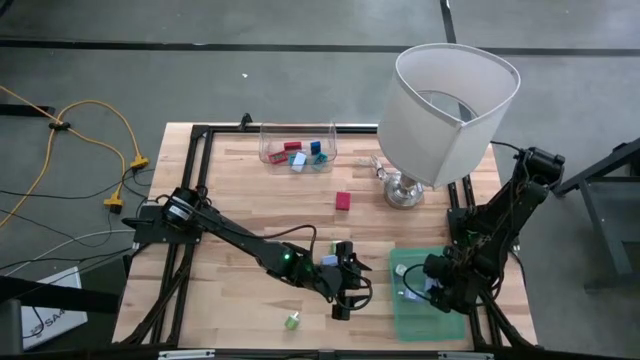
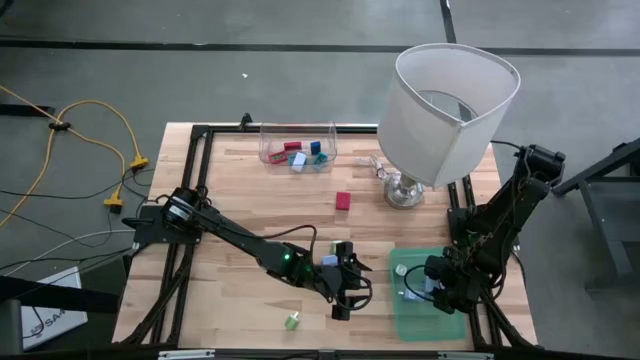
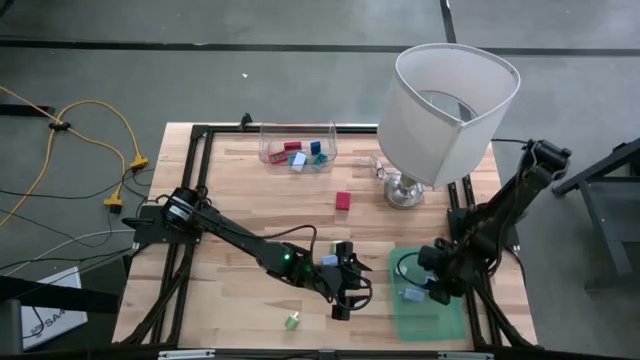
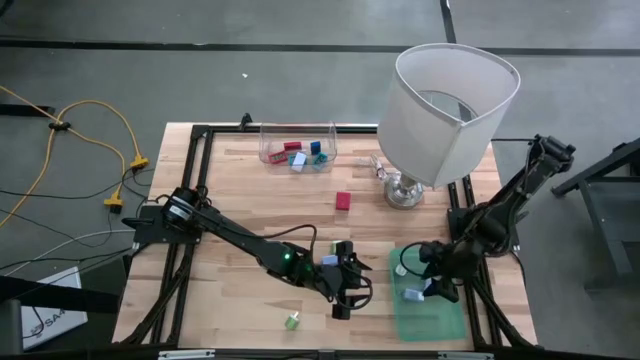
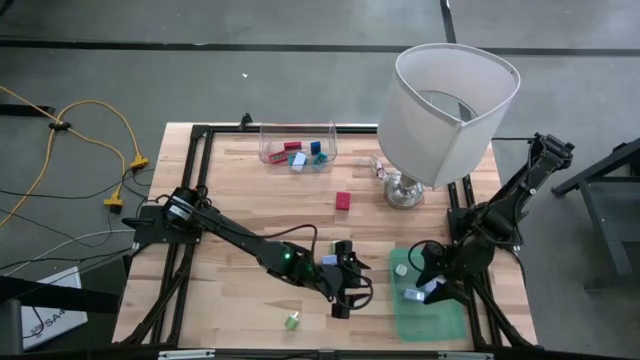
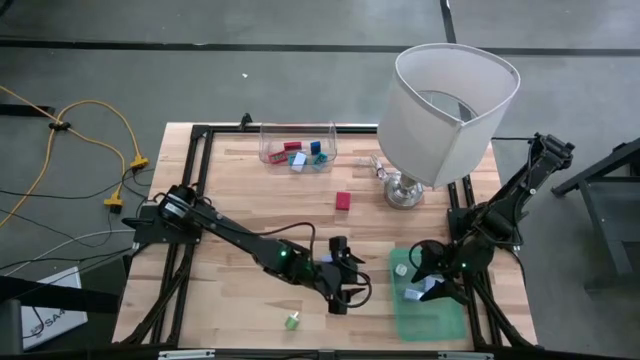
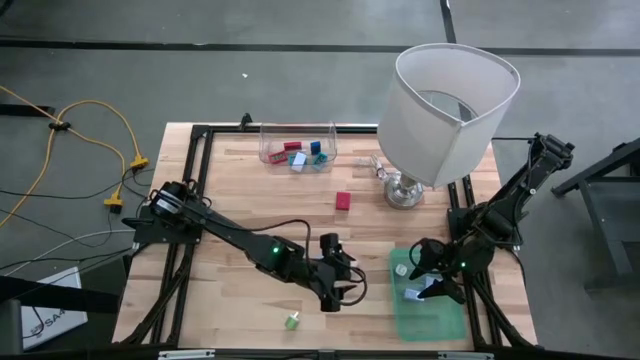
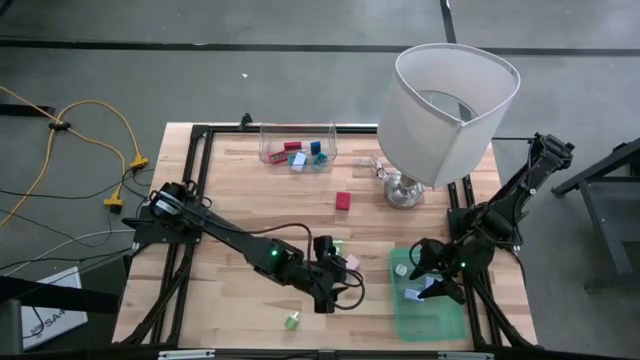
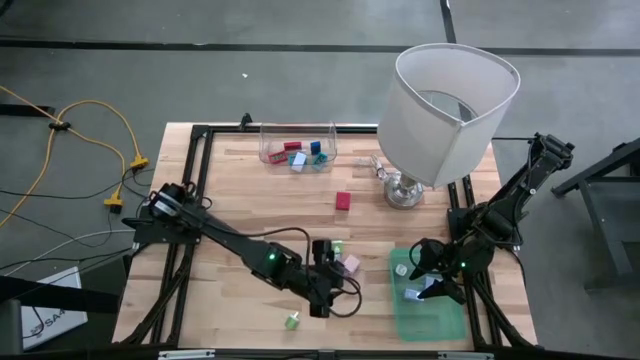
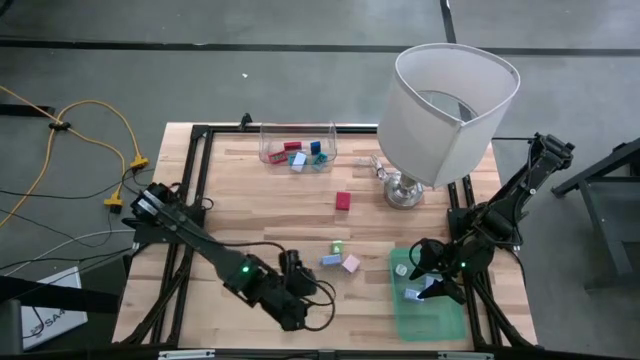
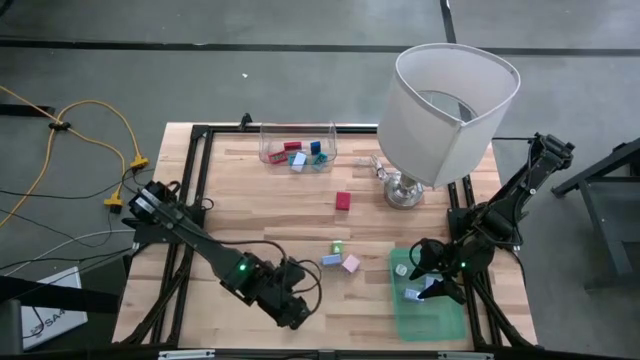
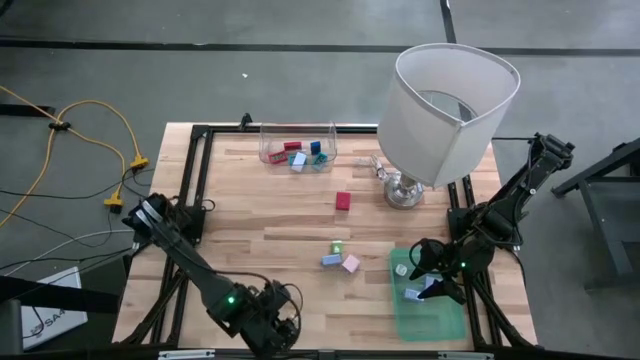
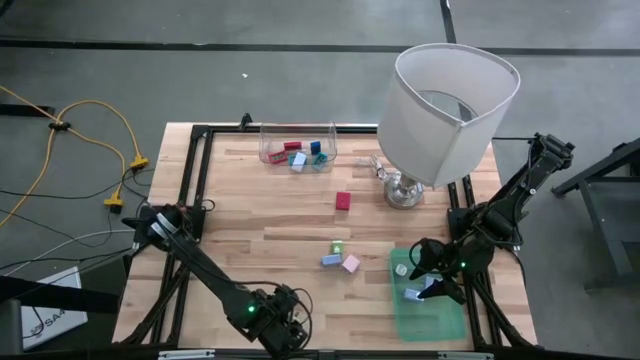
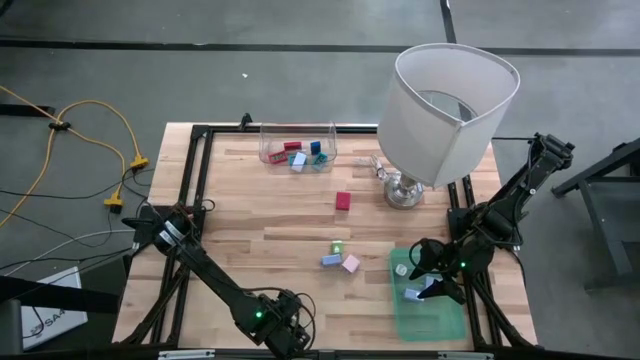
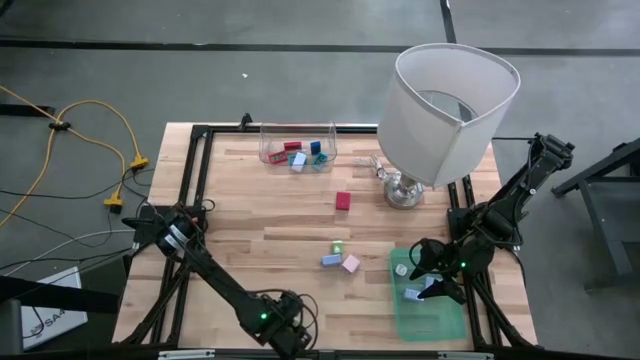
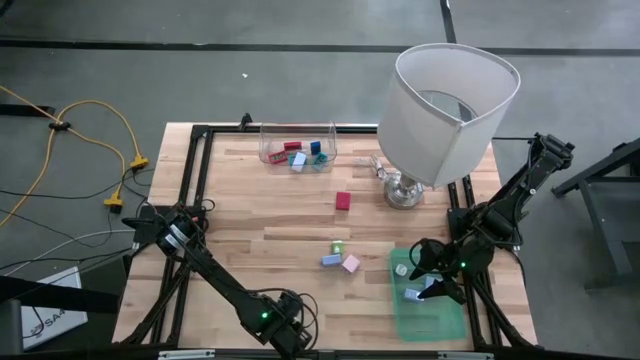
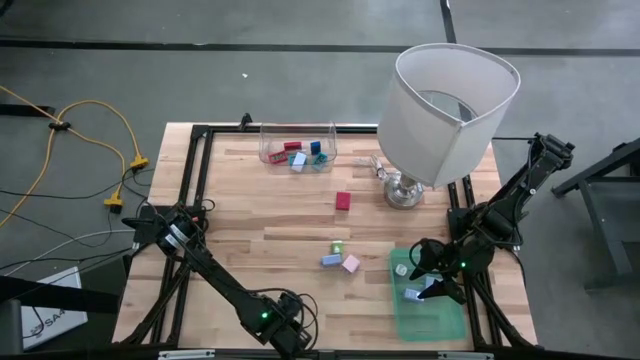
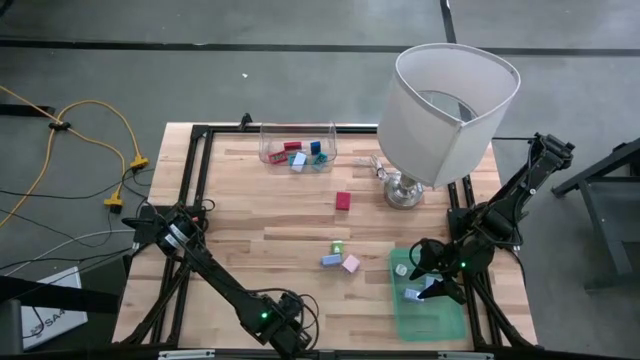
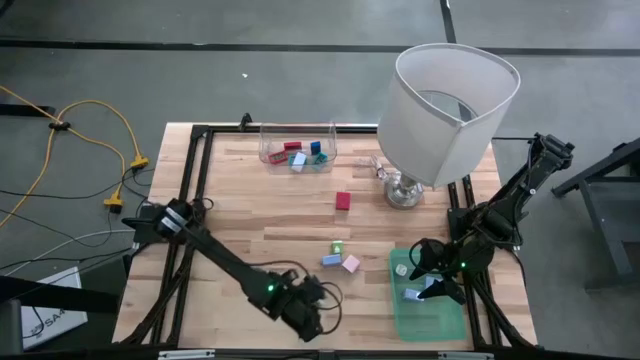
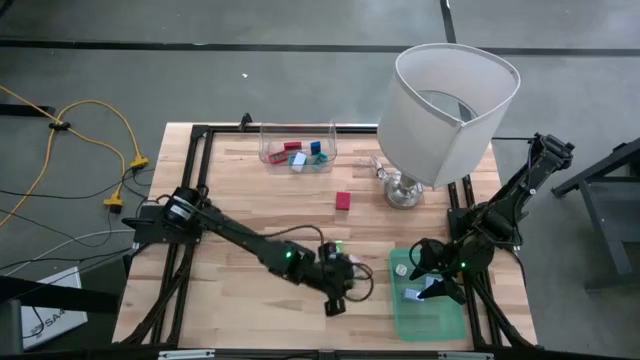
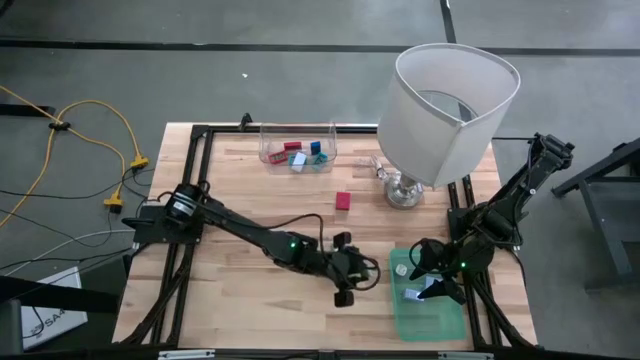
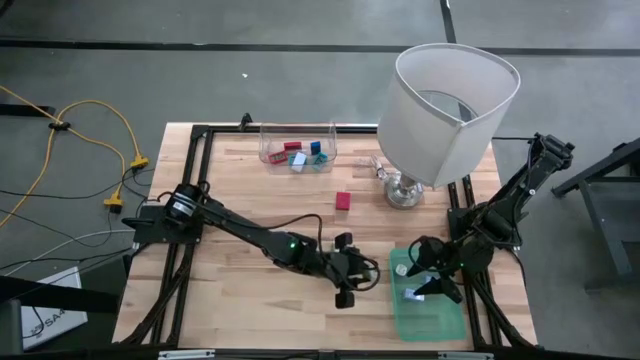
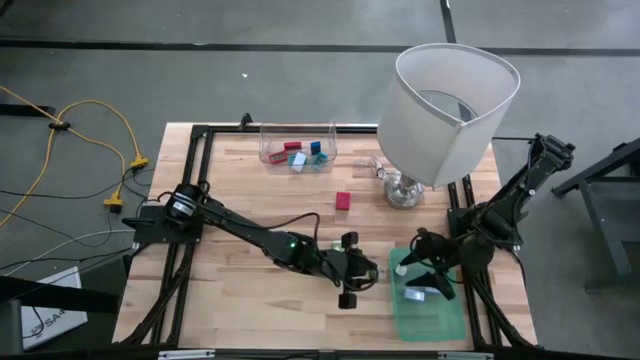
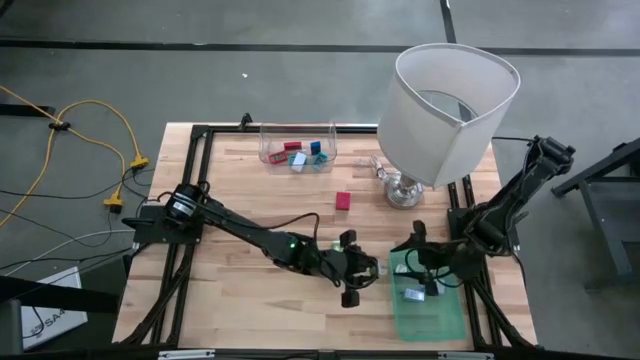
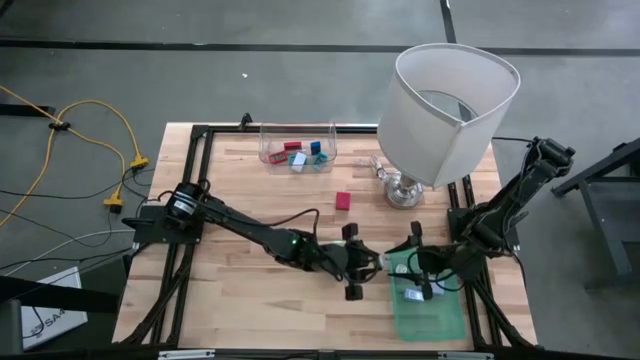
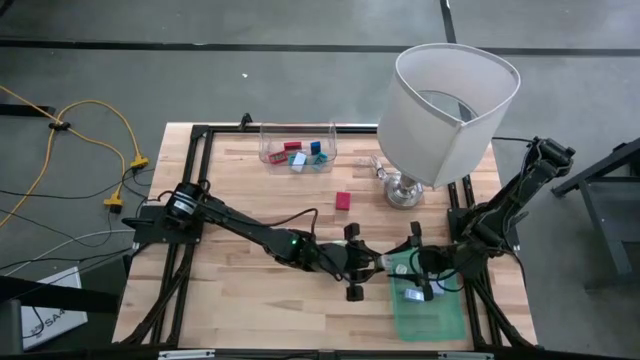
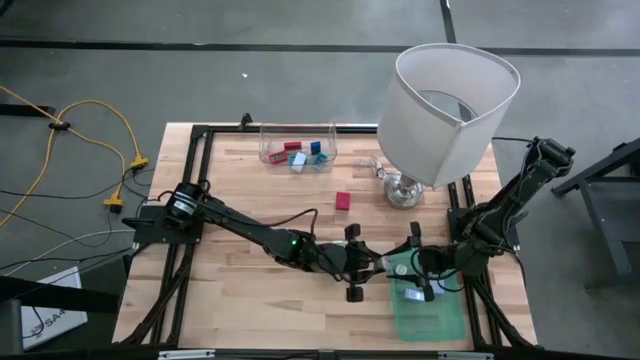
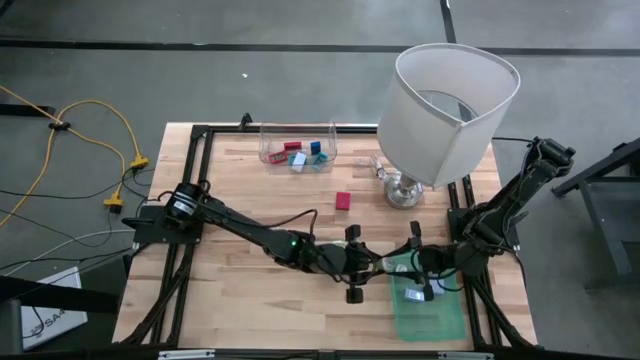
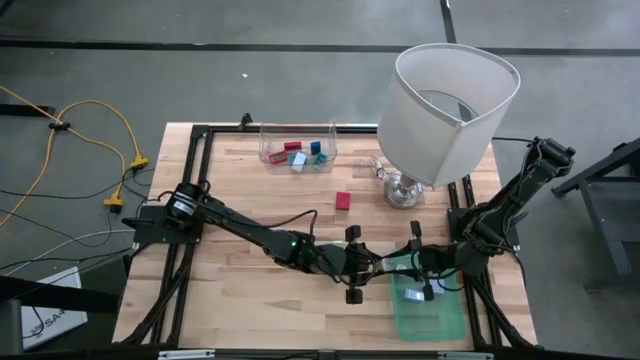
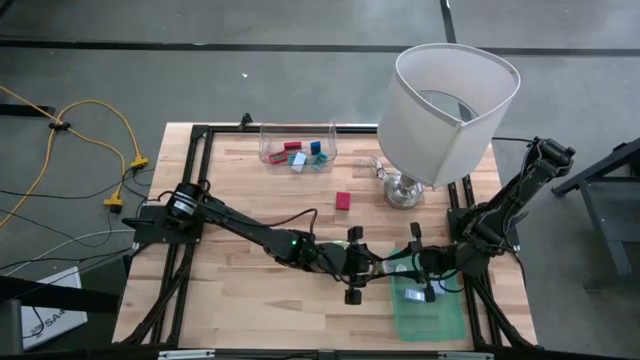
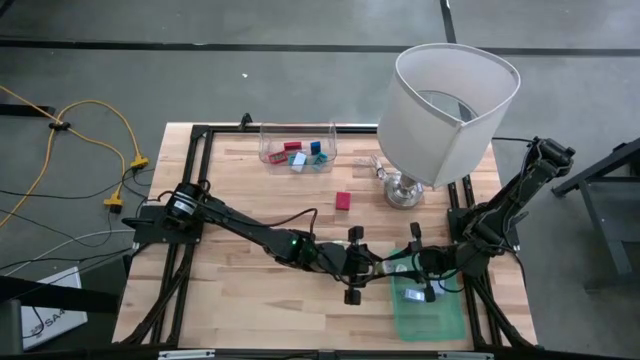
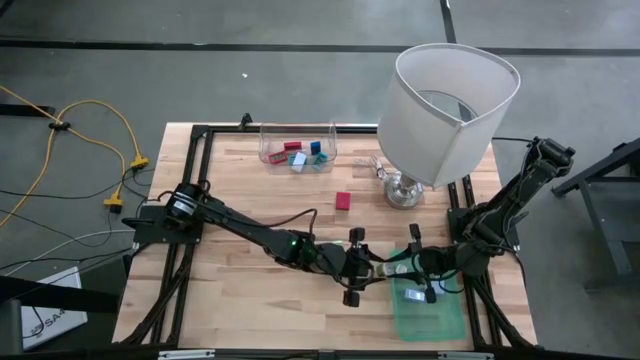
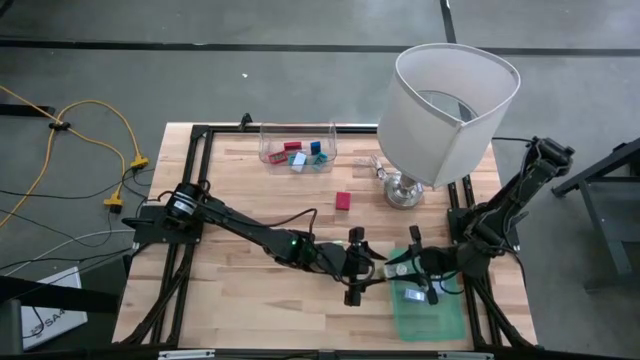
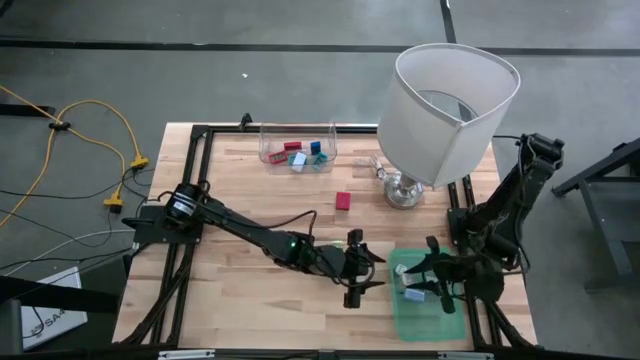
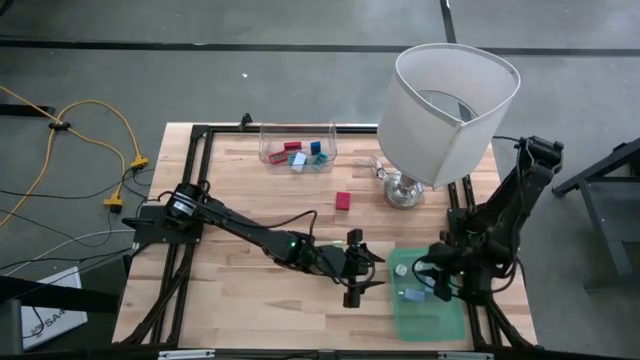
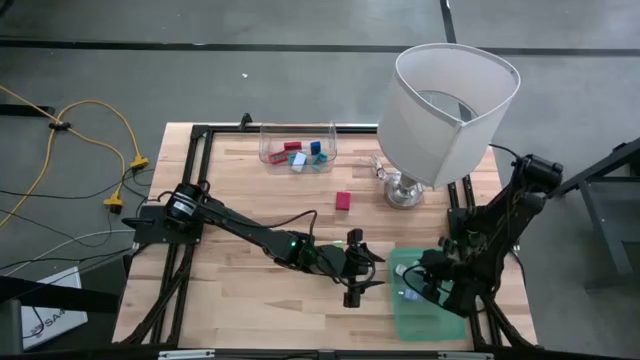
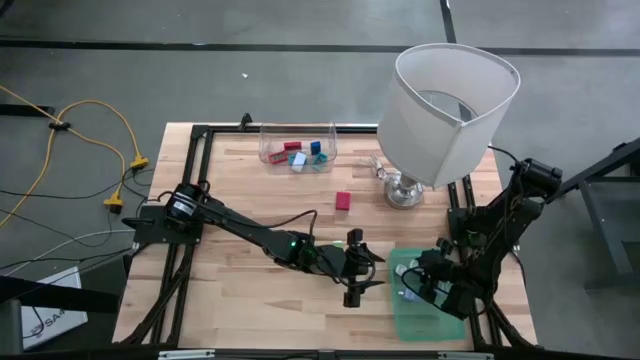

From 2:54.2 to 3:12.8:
Task: Pick & Place Office items
Put the bottom green charger adapter into the green bin

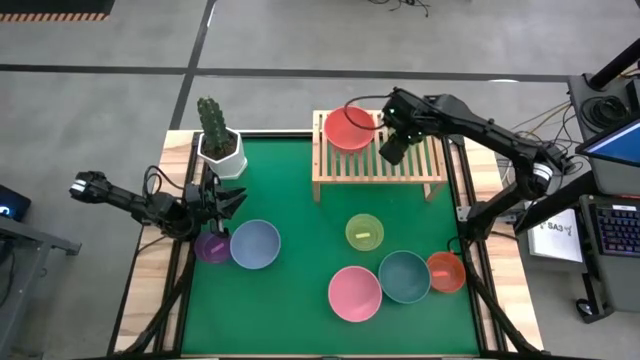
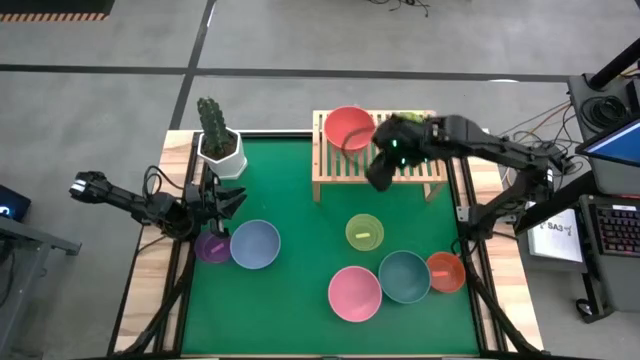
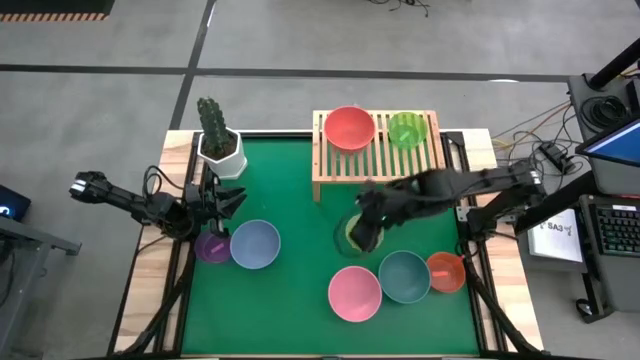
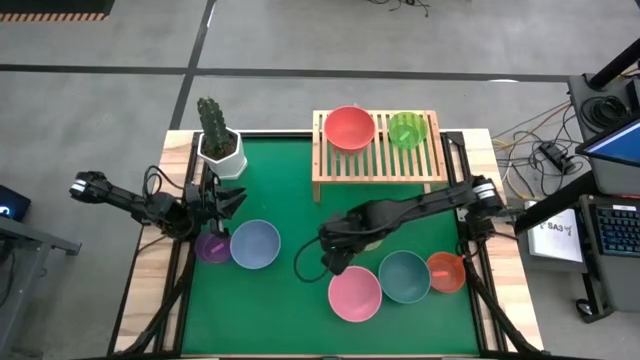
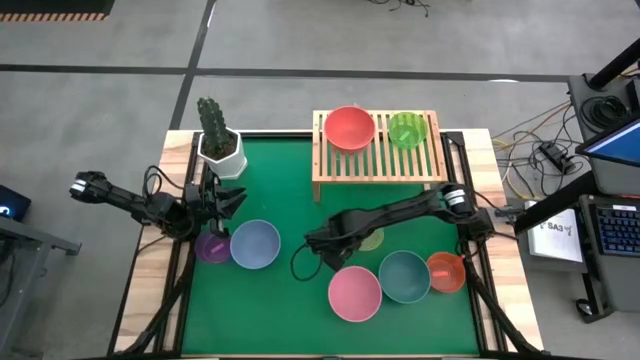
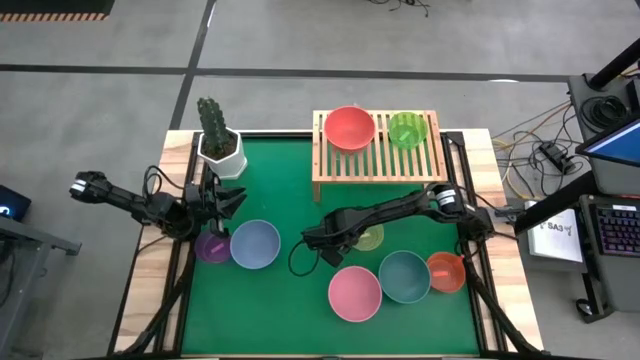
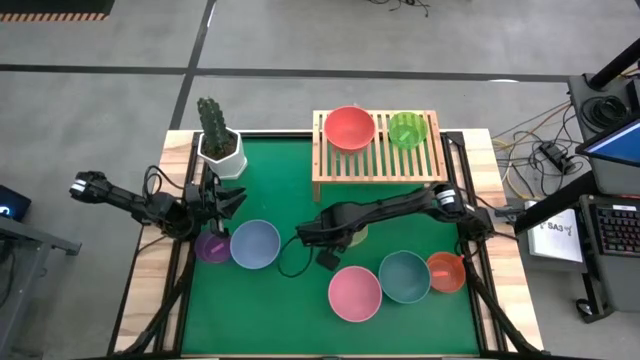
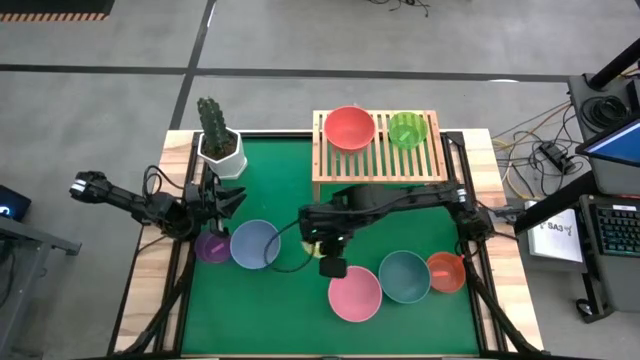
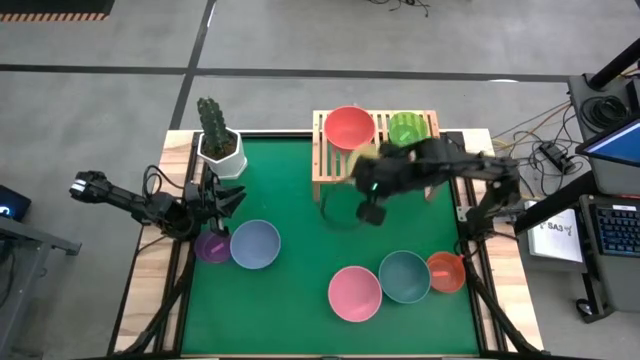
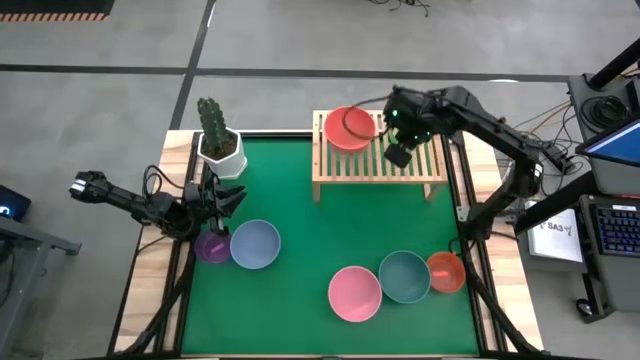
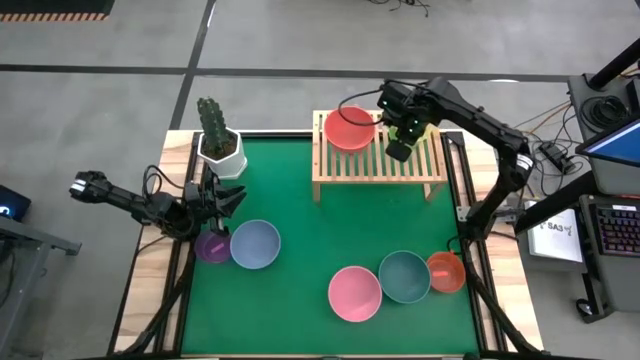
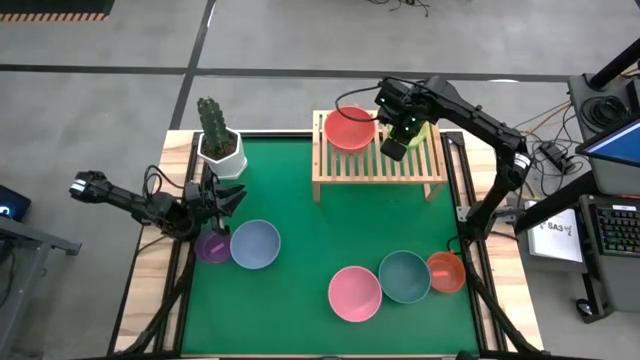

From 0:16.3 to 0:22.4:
Task: Place and stack bowls onto a shelf
Stack the yellow bowl on top of the light green bowl on the shelf
